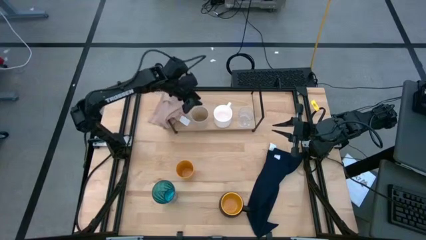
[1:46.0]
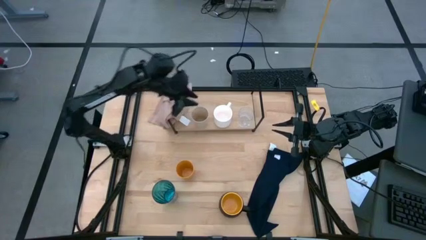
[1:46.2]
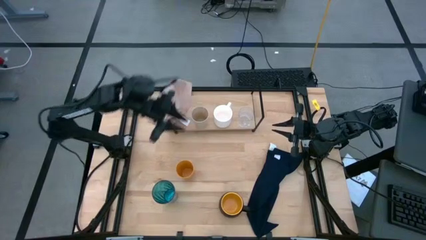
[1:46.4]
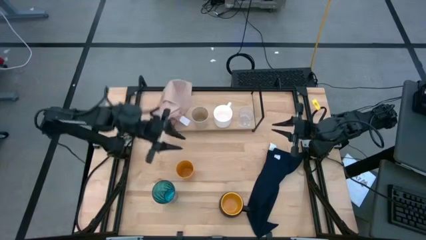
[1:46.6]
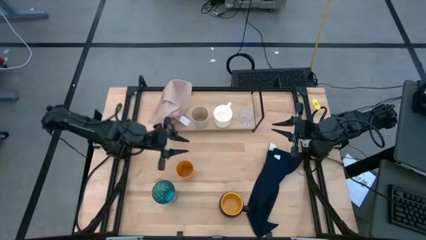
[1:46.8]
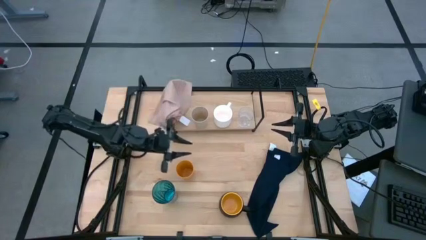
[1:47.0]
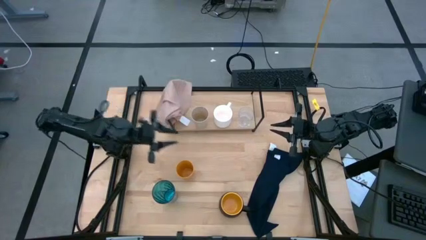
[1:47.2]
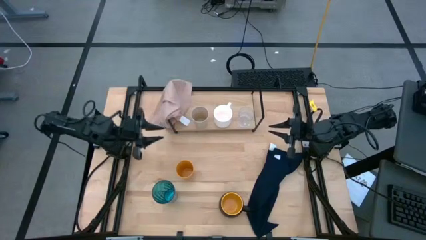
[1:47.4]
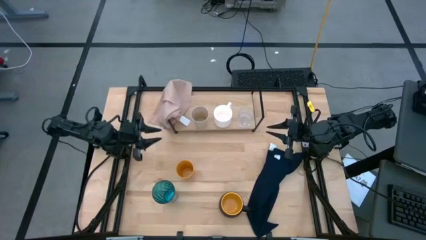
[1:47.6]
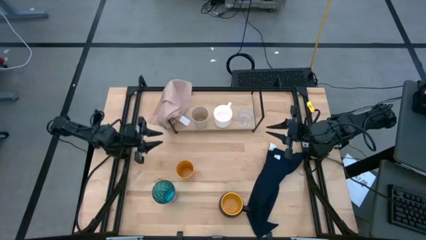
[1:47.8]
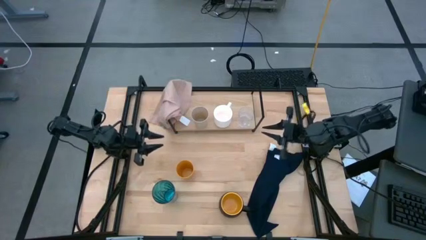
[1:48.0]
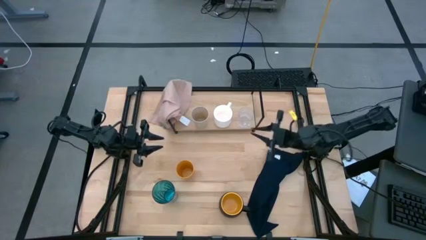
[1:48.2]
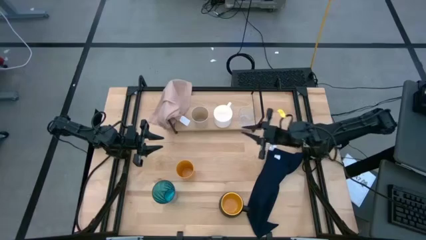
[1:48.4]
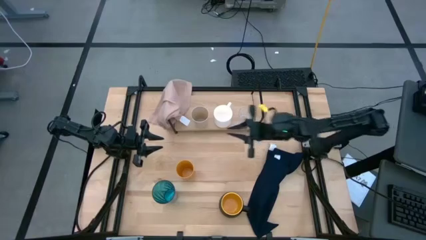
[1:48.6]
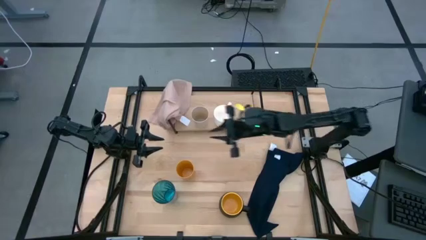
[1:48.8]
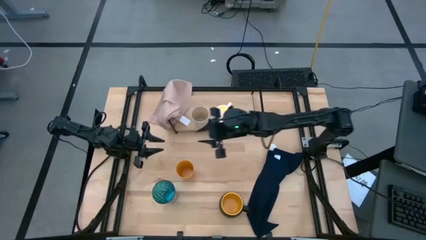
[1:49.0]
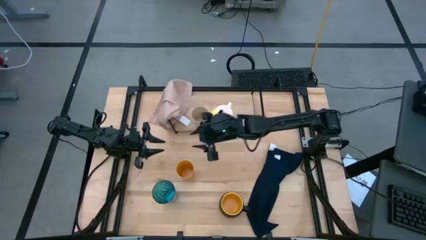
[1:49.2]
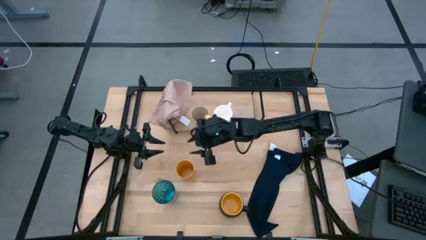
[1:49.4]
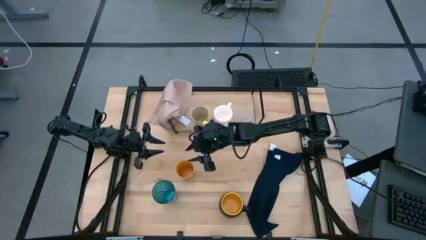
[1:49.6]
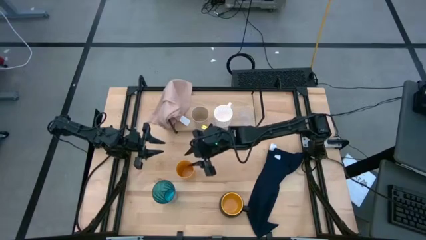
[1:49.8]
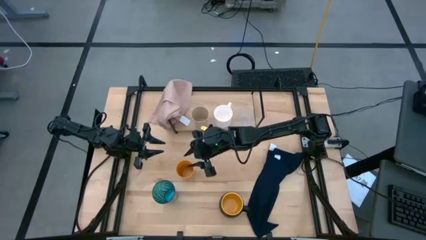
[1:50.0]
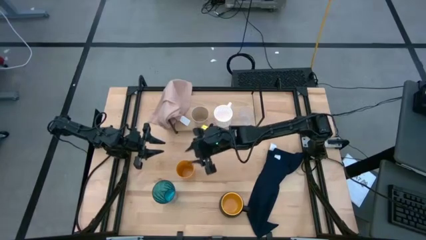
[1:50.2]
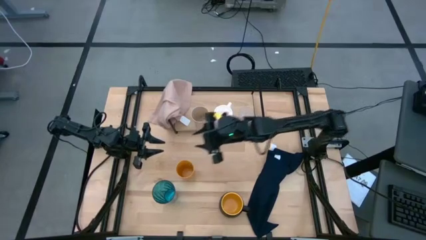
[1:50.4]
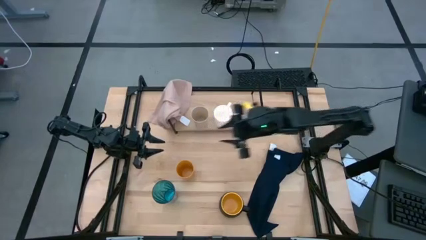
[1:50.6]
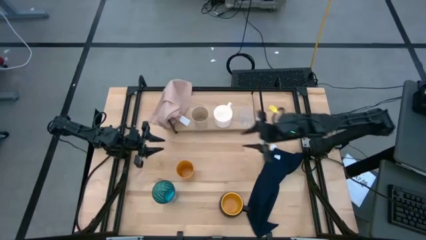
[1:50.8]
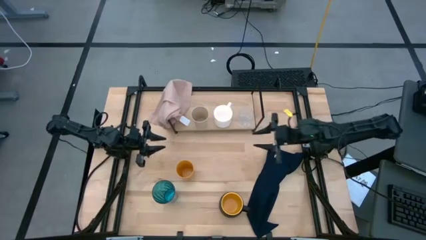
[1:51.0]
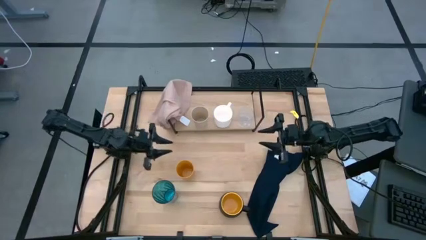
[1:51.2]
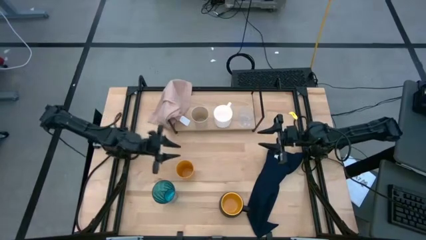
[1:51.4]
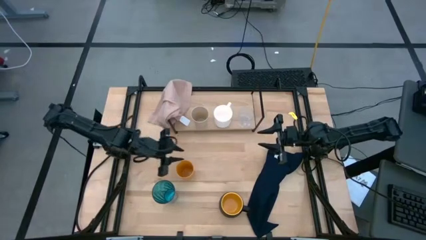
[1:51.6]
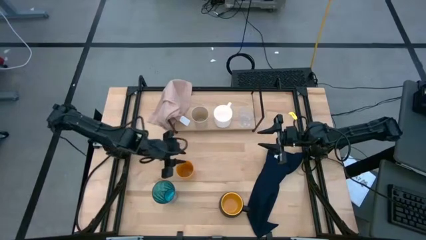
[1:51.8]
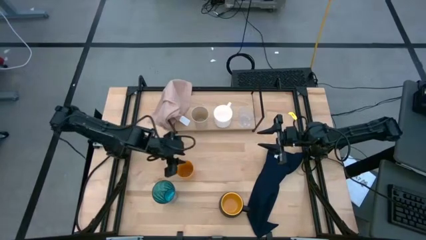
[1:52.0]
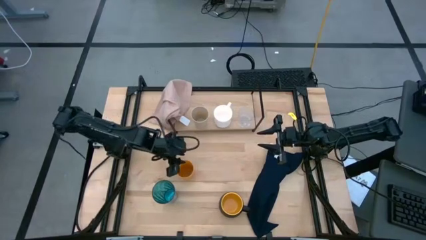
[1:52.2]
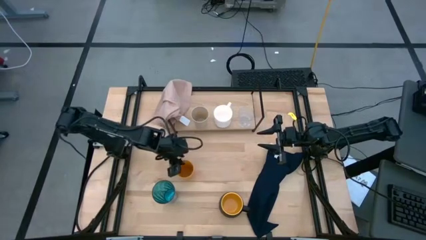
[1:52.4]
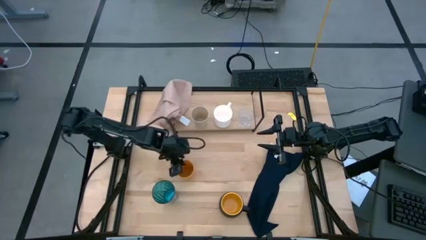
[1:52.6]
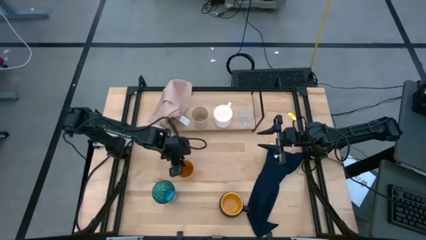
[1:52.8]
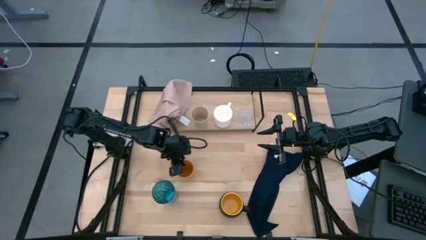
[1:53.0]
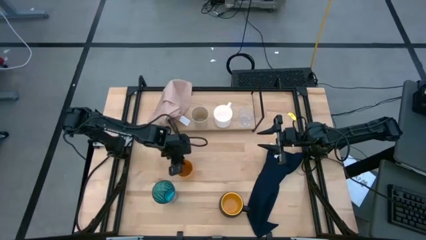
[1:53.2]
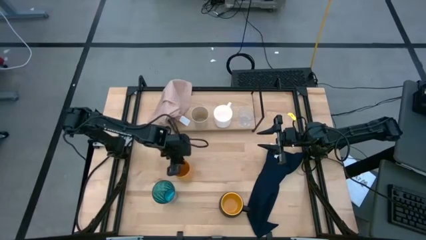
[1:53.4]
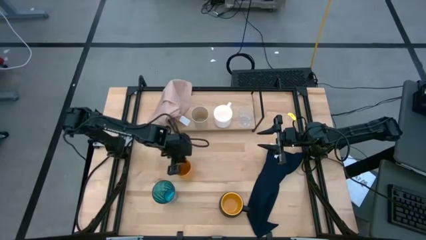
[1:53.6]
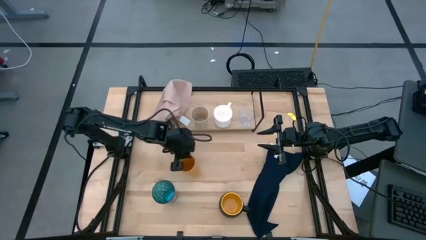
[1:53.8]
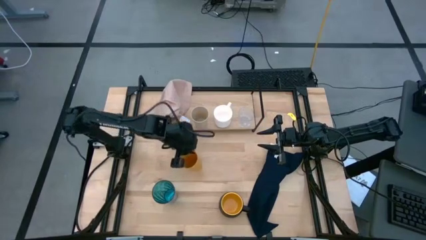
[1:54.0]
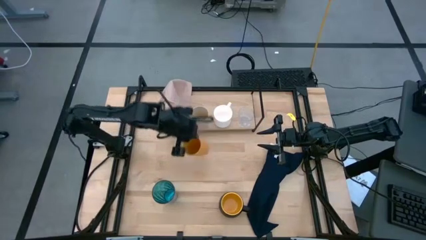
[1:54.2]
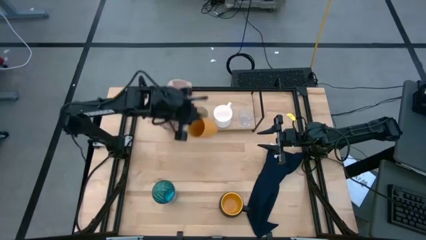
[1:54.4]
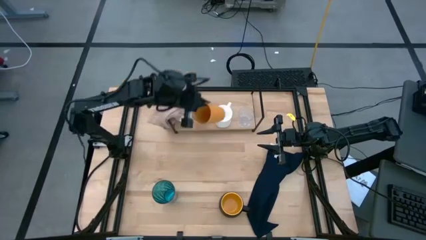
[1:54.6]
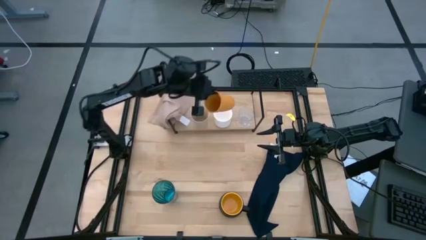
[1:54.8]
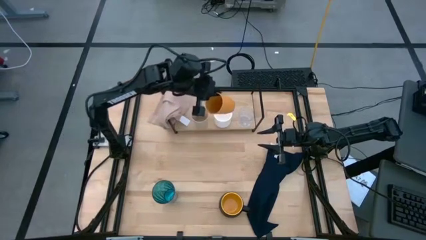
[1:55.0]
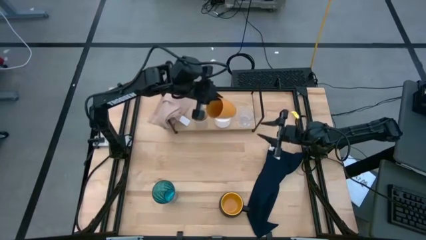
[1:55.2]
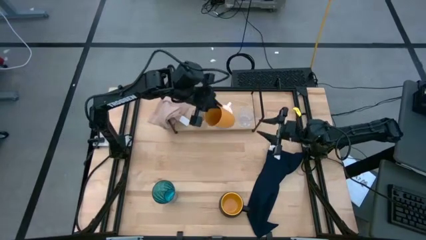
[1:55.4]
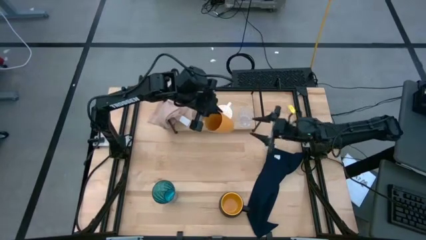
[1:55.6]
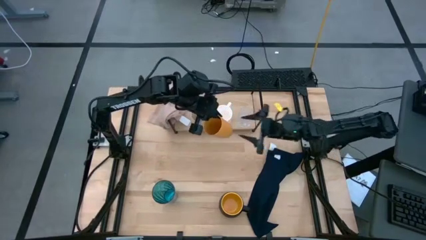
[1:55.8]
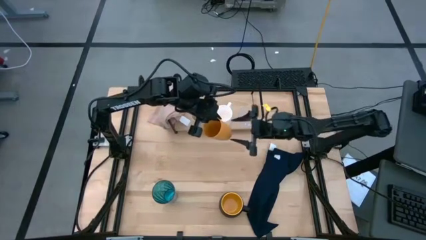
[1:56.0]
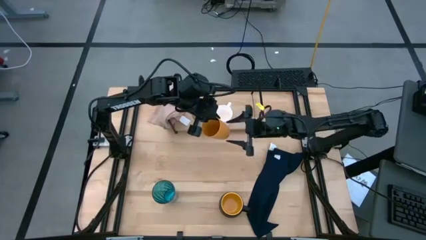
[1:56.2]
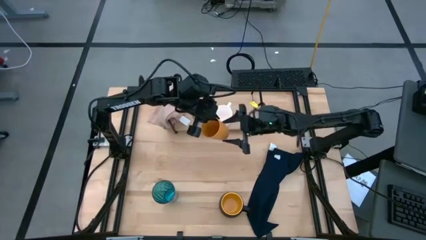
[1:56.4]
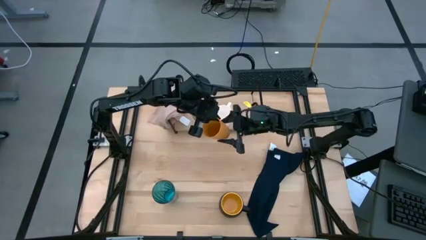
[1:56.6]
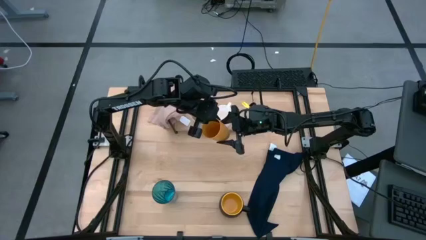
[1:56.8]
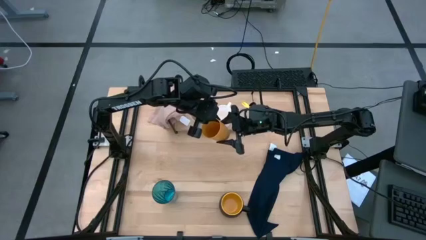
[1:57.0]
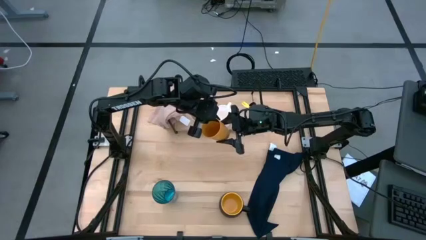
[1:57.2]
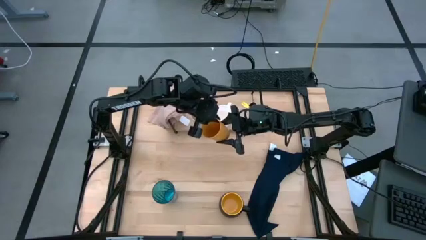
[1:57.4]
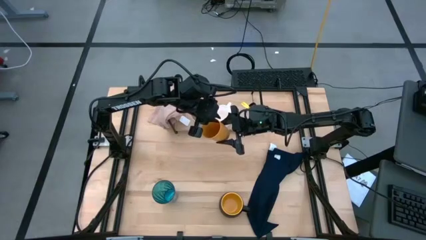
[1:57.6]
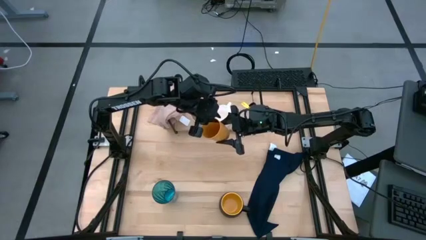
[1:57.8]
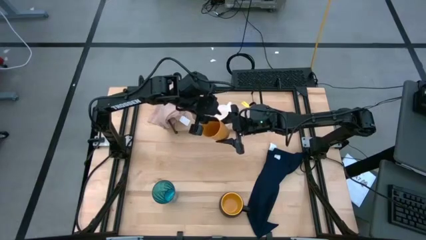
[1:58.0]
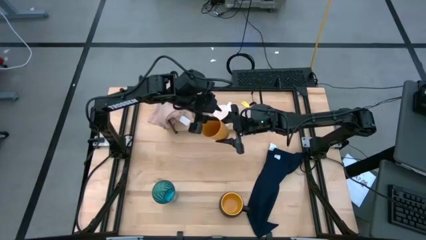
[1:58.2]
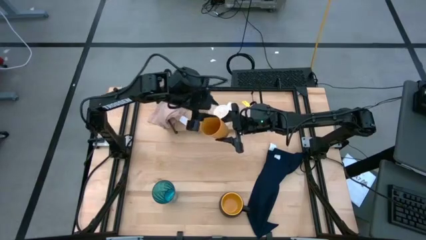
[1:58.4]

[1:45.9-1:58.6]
Task: Stack small to large cups/mugs on shelf
Put the orange cup on the shelf

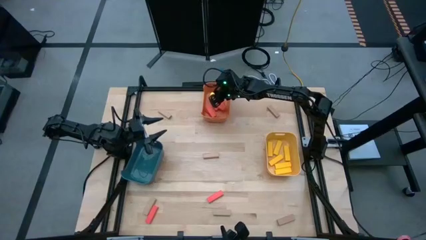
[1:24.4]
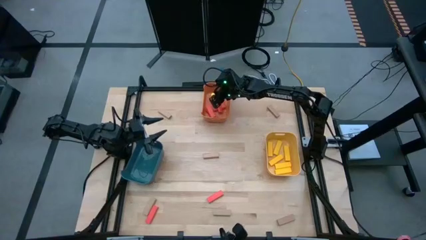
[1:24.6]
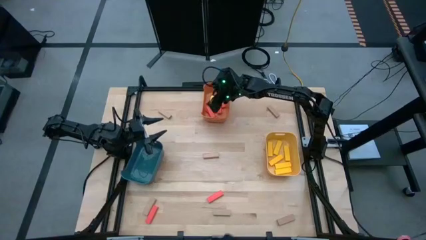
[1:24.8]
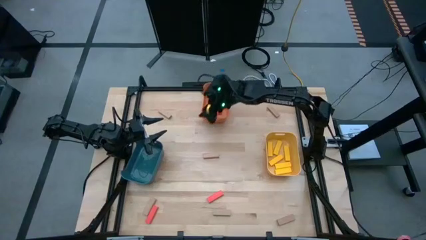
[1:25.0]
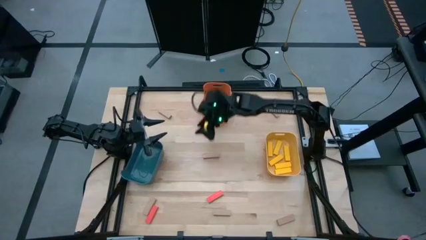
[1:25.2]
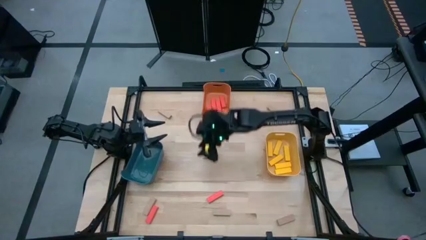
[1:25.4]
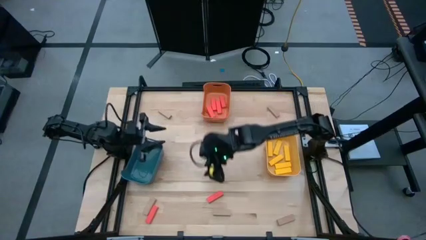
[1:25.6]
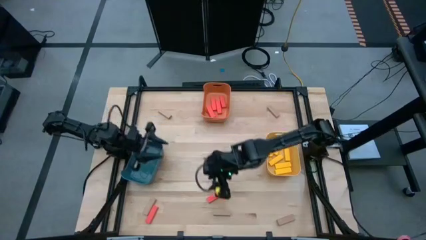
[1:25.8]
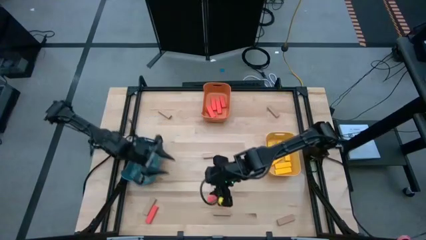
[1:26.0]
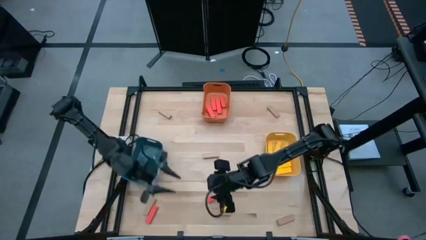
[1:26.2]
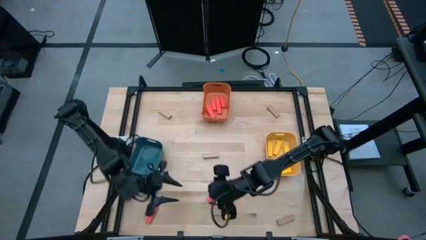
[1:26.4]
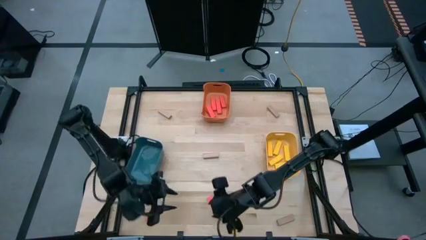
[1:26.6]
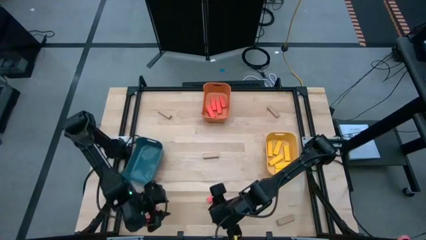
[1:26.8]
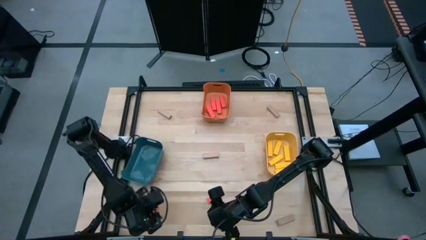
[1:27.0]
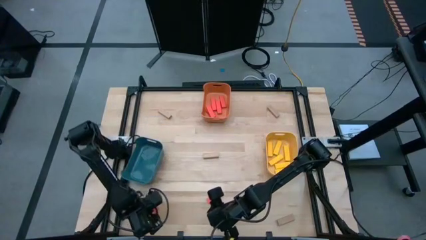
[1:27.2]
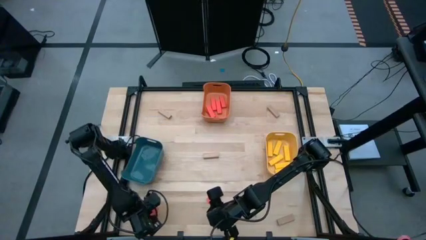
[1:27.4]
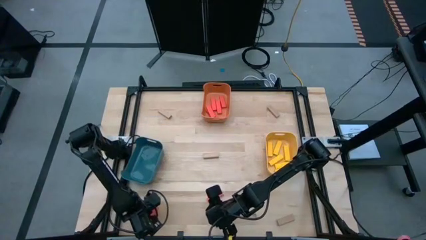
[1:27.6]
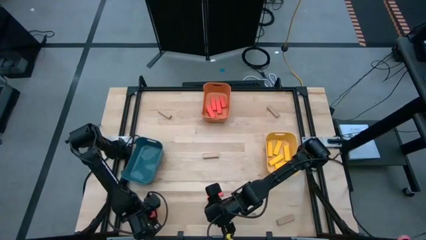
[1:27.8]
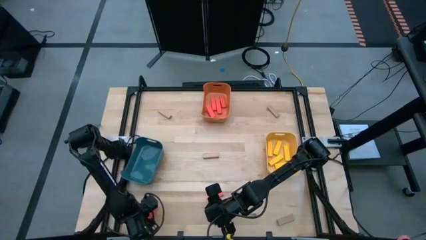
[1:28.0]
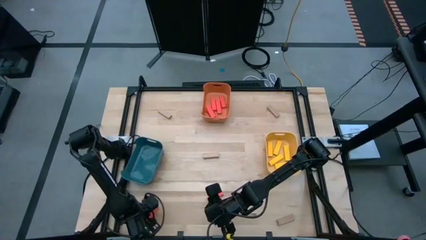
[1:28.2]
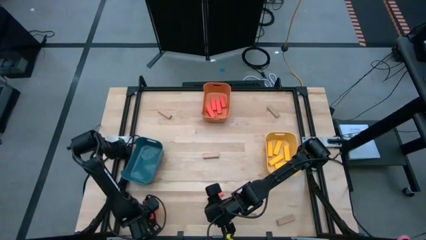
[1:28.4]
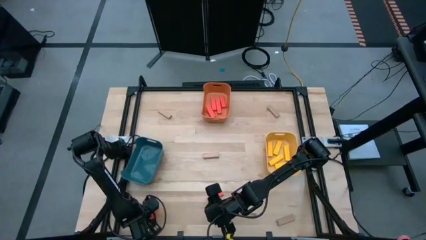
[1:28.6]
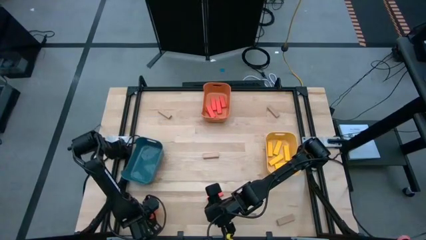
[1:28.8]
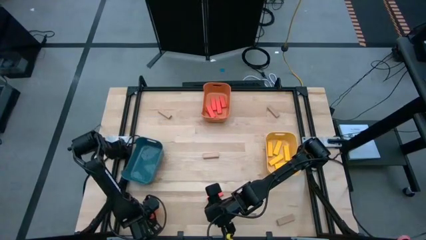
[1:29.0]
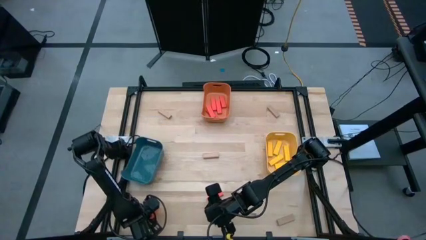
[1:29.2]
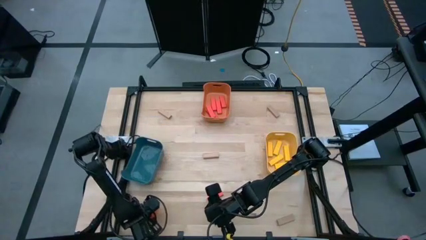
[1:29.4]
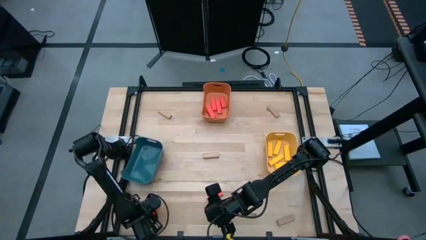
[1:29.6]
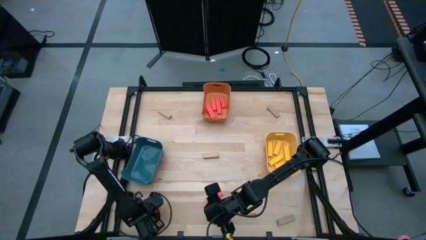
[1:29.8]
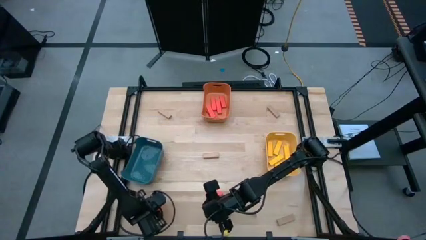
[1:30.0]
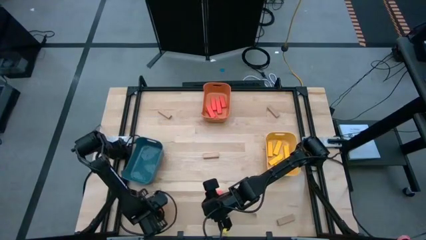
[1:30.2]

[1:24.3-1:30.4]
Task: Sort blocks
Put the left orange block into the orange bin
